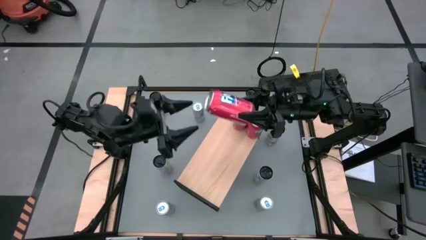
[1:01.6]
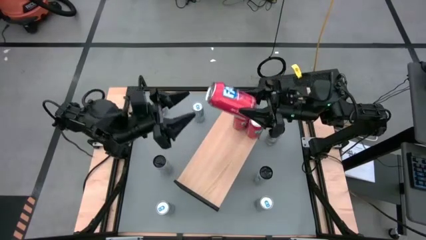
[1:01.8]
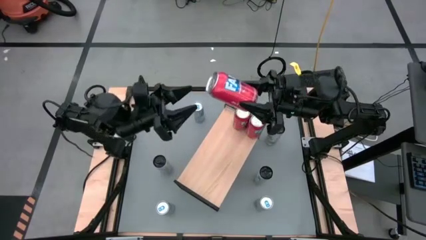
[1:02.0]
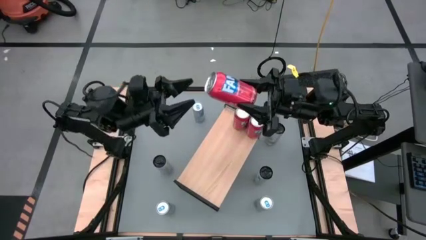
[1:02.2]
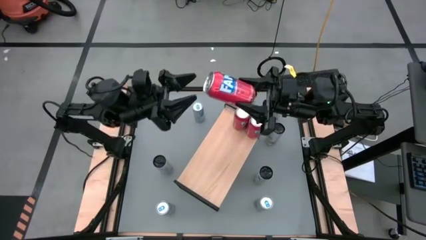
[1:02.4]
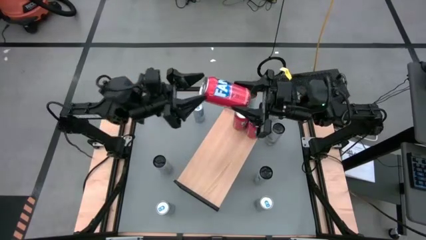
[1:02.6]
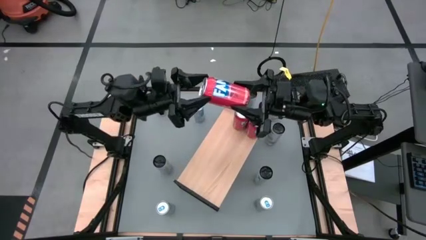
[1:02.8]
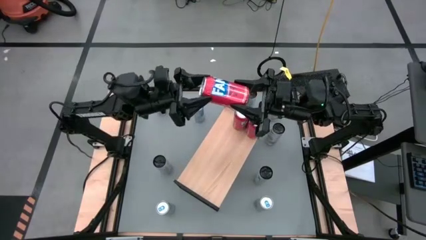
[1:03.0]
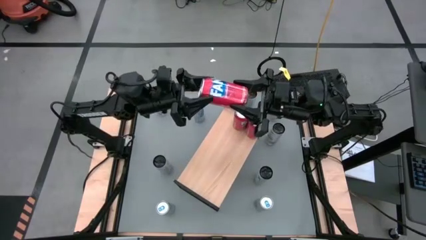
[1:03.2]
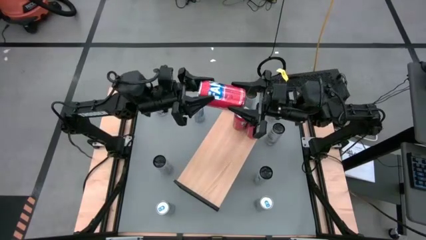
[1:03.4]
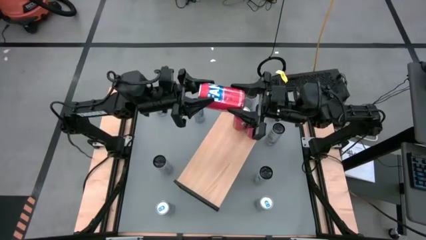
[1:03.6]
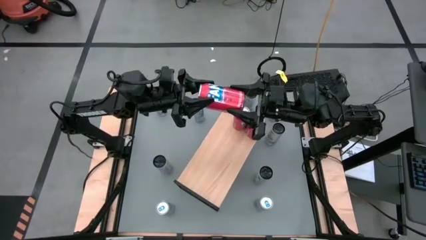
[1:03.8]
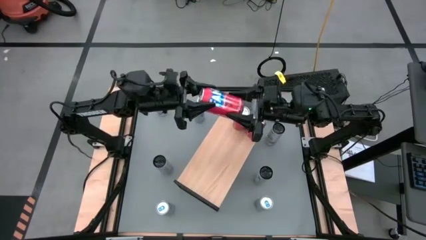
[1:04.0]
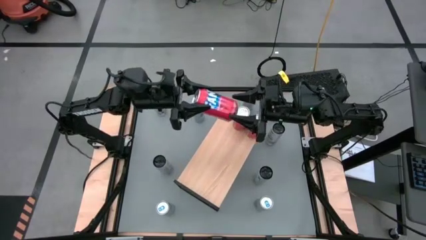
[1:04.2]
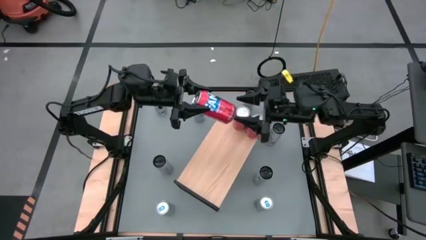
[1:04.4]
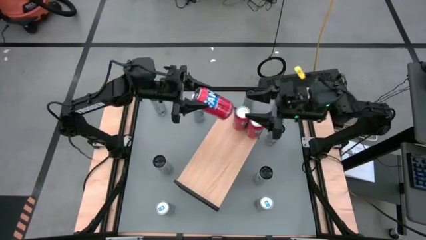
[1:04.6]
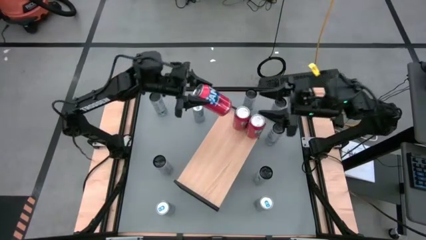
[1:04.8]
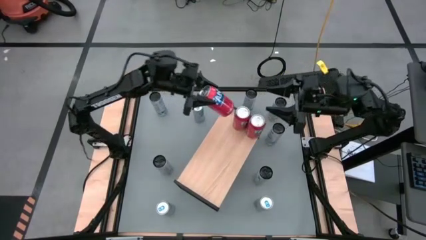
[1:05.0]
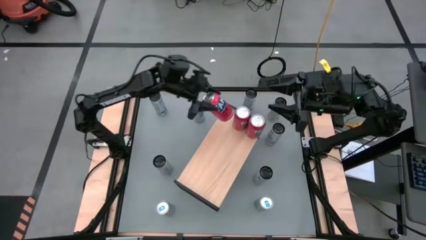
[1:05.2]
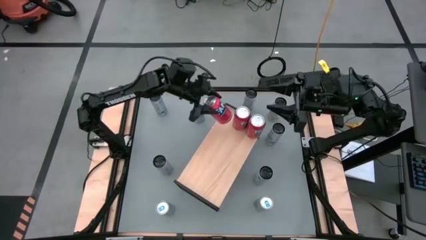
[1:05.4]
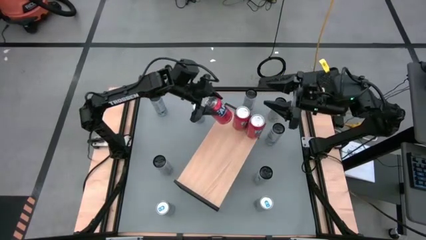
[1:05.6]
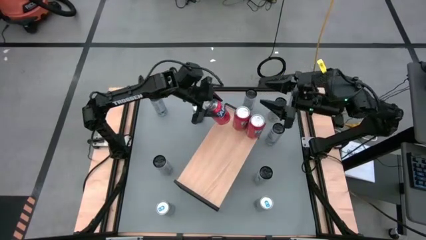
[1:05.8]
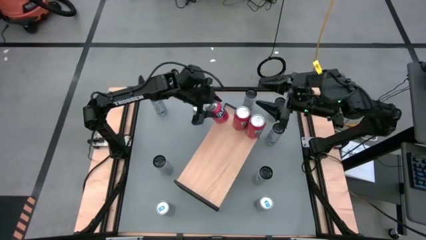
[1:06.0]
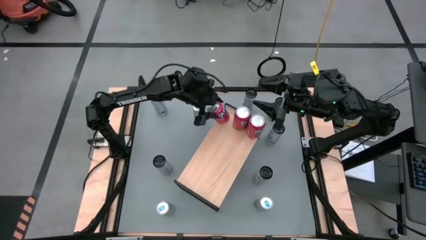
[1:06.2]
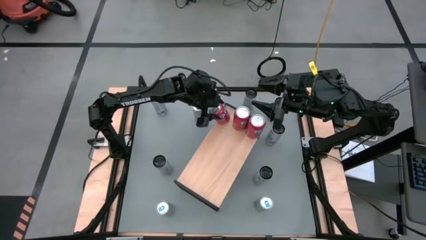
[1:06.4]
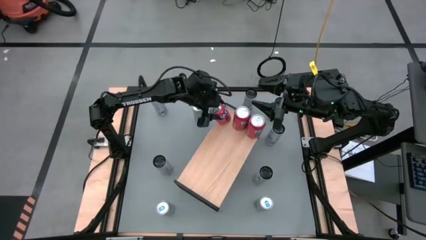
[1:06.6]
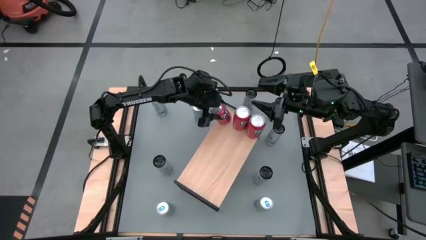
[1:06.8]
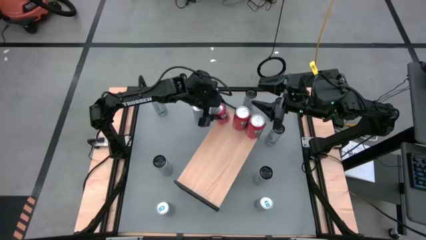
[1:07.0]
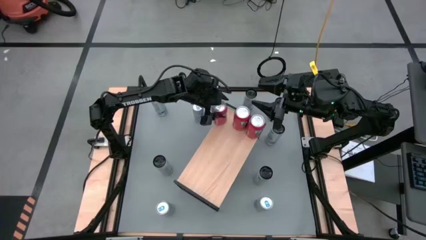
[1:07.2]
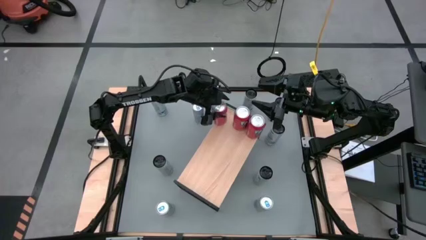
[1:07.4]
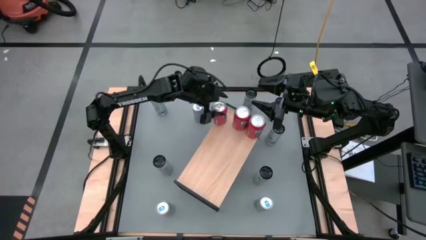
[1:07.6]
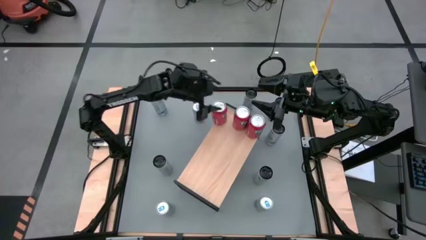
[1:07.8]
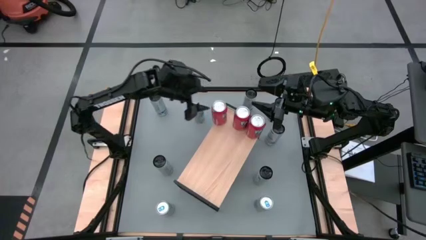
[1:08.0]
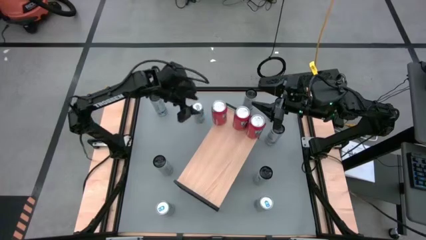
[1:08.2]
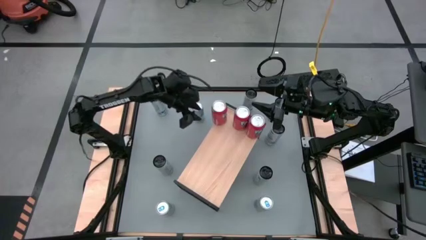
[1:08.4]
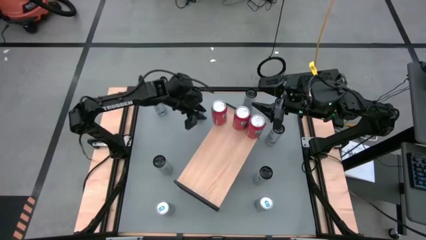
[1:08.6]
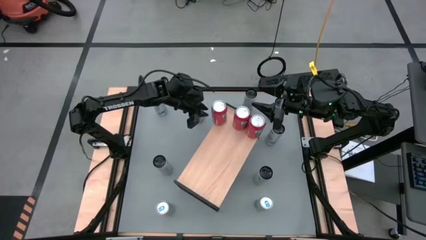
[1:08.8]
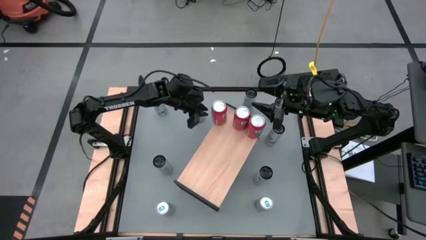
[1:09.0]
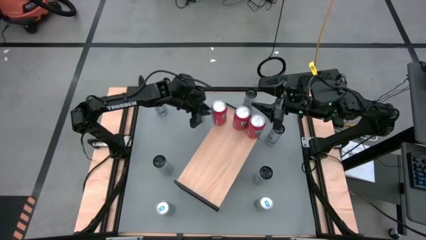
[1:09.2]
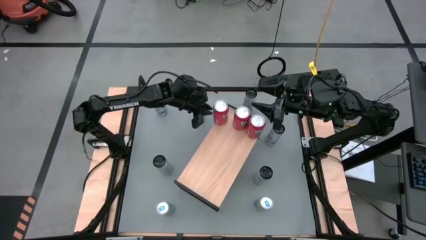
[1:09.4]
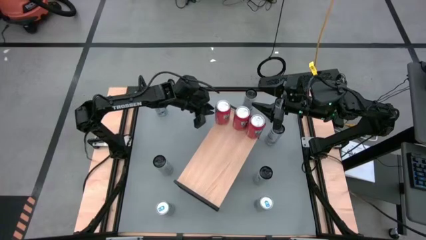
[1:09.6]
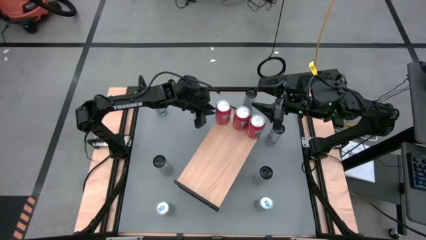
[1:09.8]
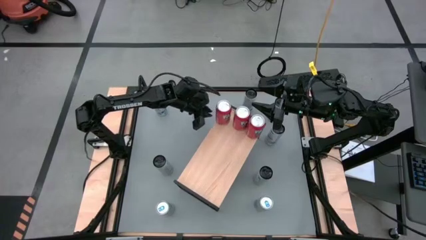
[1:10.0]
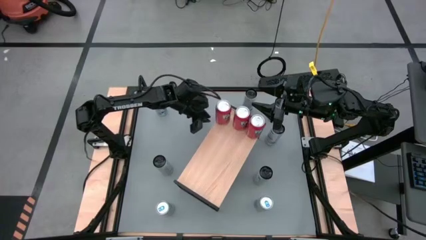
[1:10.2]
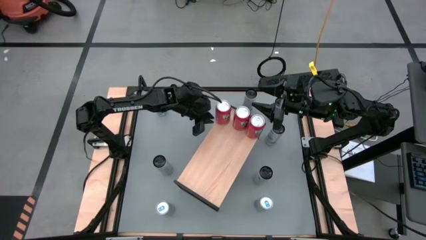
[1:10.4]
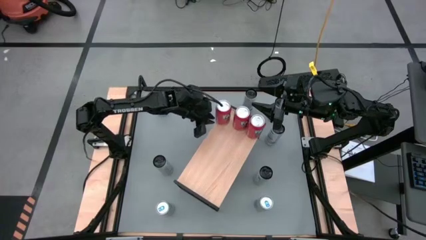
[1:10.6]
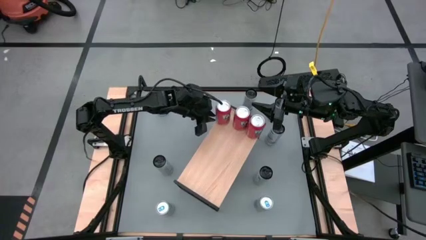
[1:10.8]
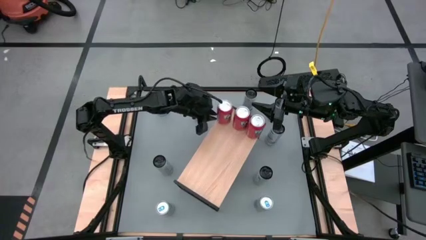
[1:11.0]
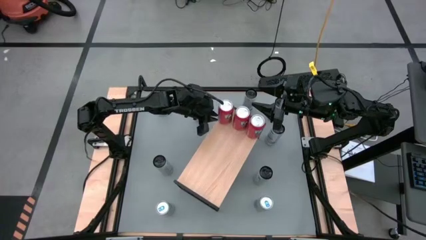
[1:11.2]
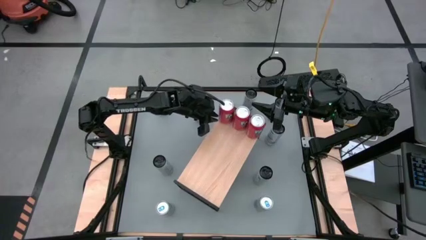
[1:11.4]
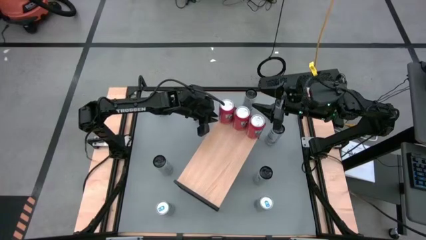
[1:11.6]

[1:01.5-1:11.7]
Task: Place canned beverage on shelf
Put the red soda can on the shelf aligned with the other red soda cans

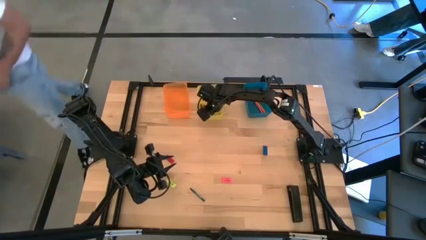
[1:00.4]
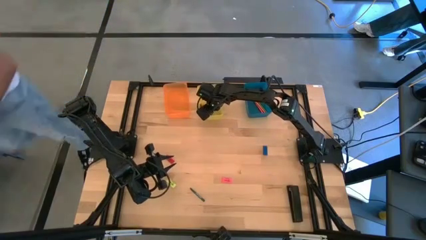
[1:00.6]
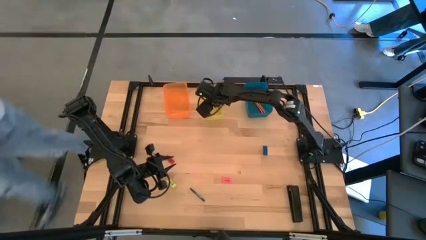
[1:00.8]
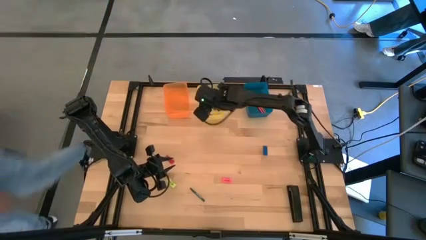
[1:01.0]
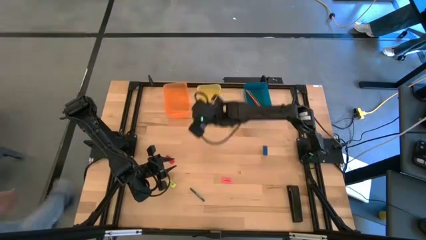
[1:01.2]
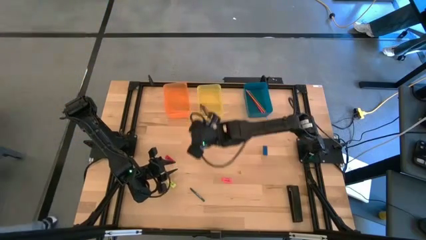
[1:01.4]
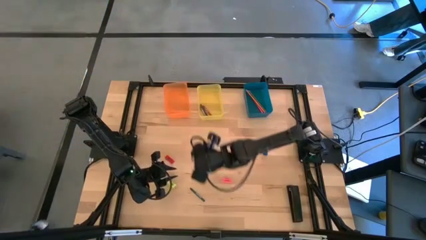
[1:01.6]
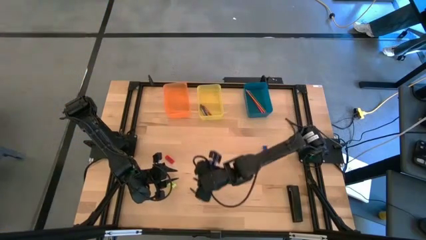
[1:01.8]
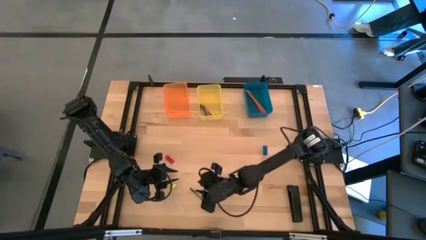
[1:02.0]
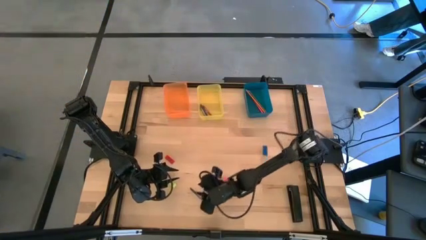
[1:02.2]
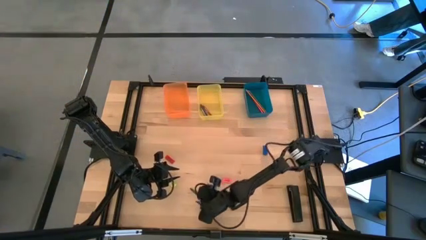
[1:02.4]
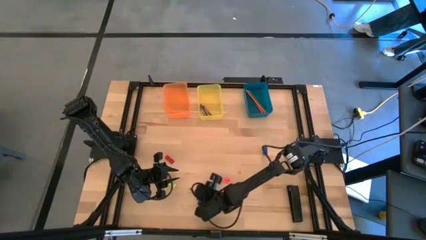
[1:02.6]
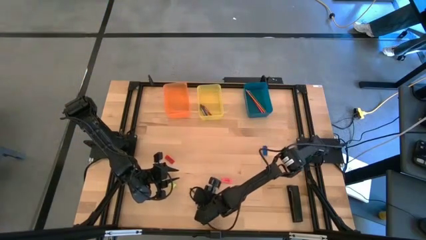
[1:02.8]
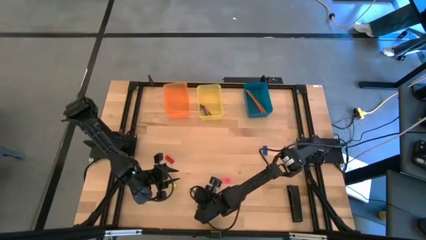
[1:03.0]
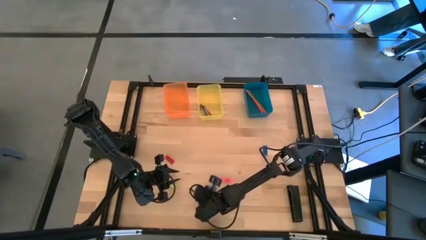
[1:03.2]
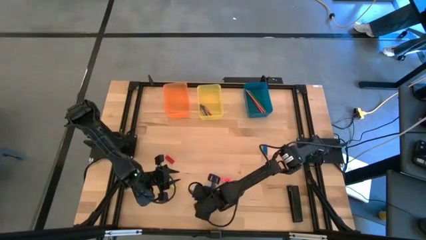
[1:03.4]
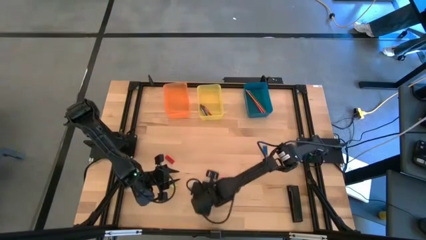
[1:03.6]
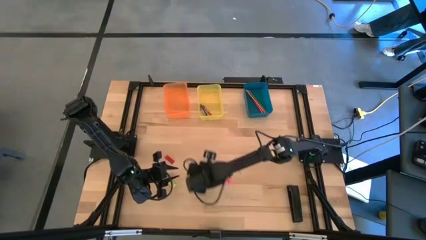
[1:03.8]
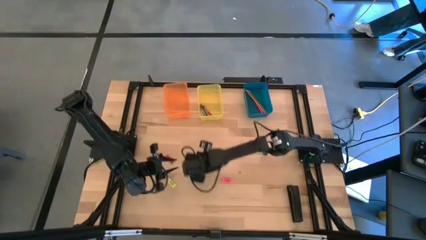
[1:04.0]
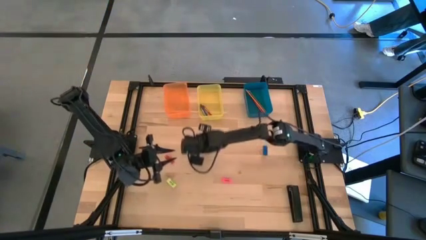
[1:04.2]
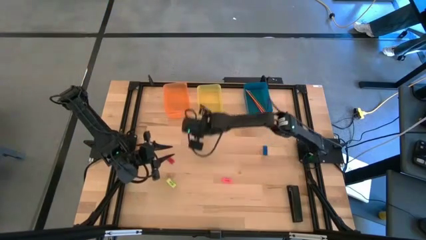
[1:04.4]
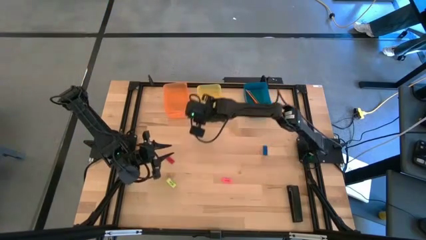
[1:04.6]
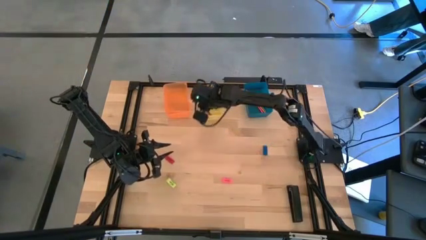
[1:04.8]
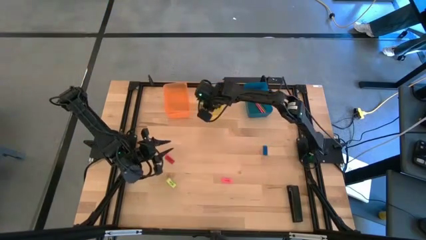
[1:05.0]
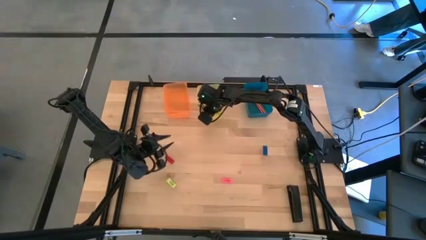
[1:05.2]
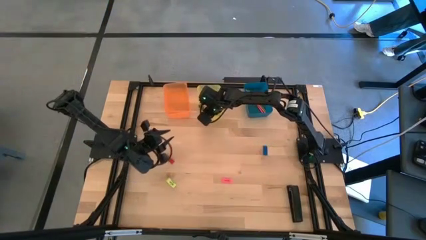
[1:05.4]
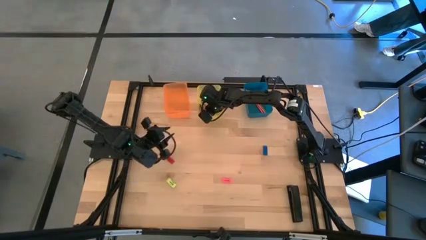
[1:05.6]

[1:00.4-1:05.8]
Task: Sort crayons/erasers/pens/pencils in bins
Put the green crayon into the yellow bin
